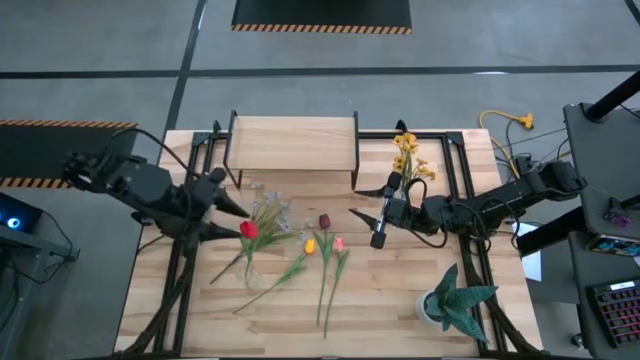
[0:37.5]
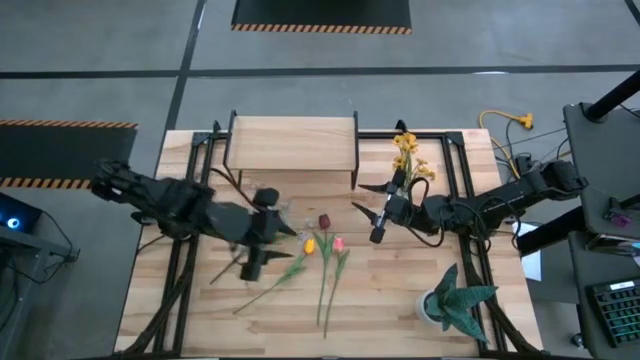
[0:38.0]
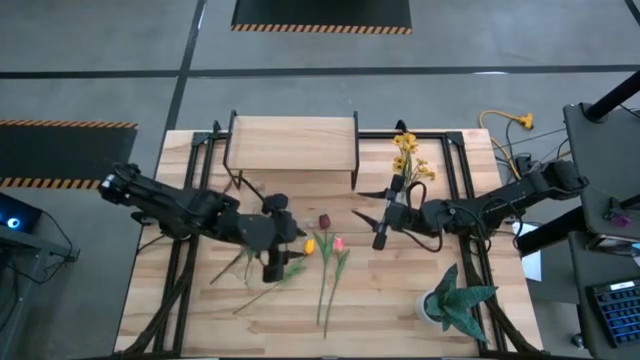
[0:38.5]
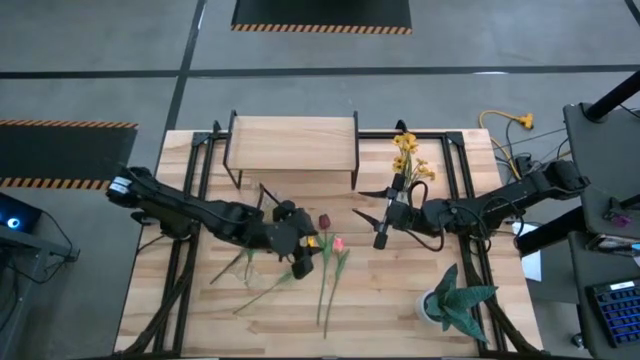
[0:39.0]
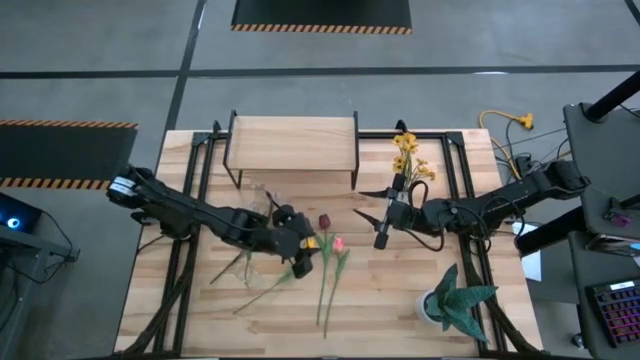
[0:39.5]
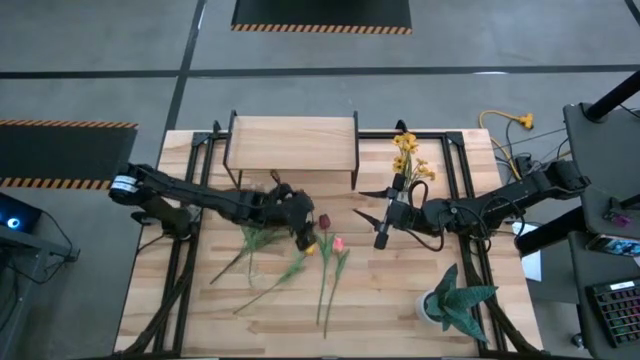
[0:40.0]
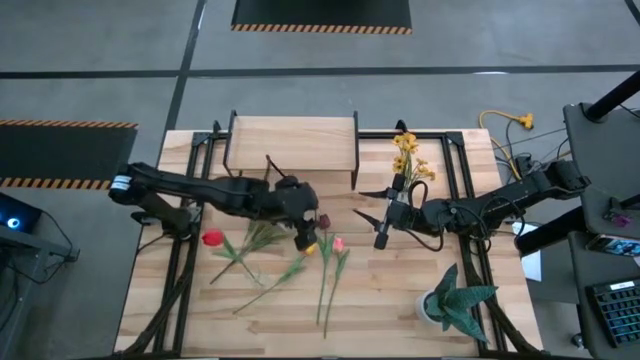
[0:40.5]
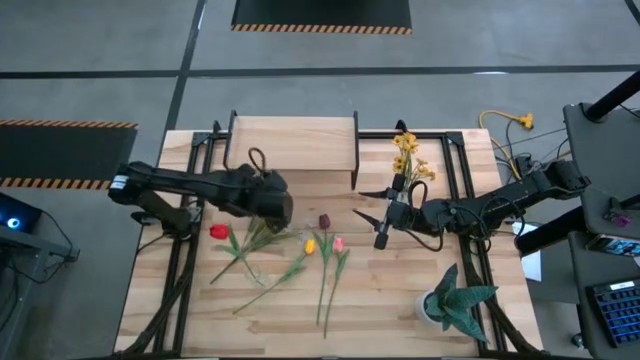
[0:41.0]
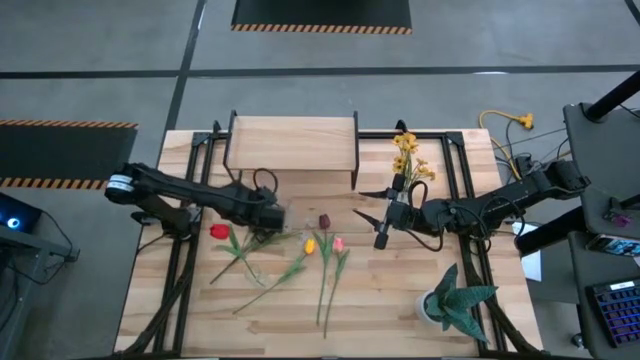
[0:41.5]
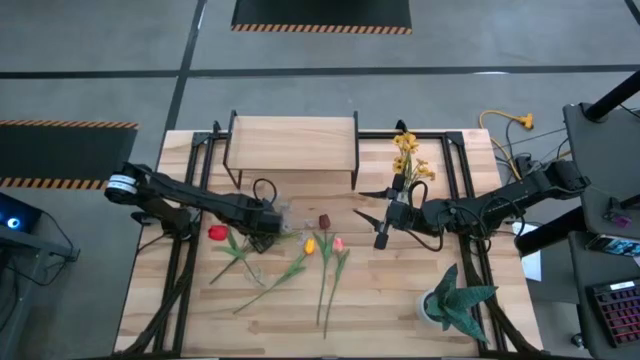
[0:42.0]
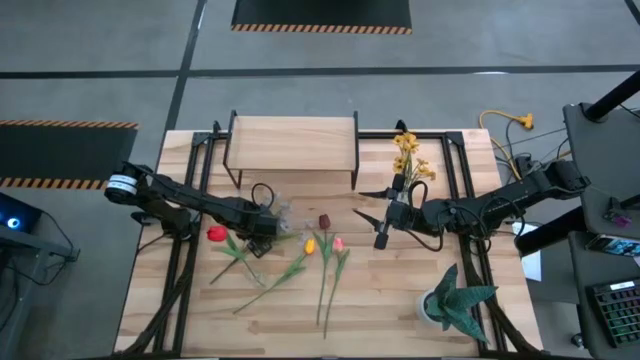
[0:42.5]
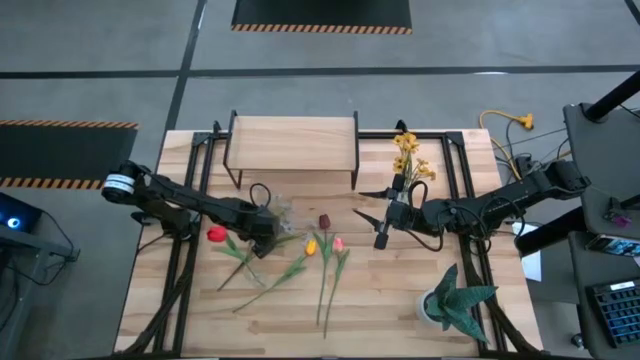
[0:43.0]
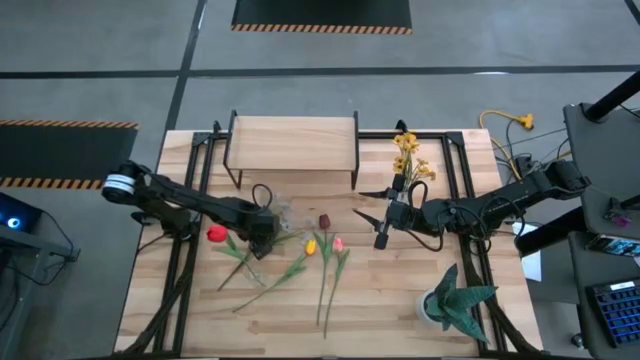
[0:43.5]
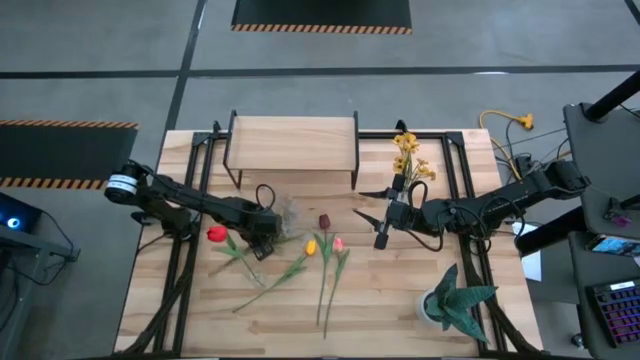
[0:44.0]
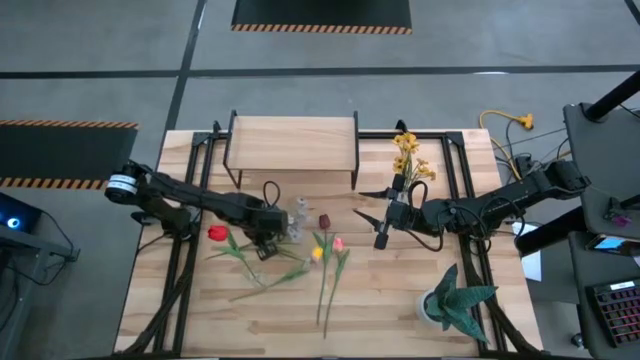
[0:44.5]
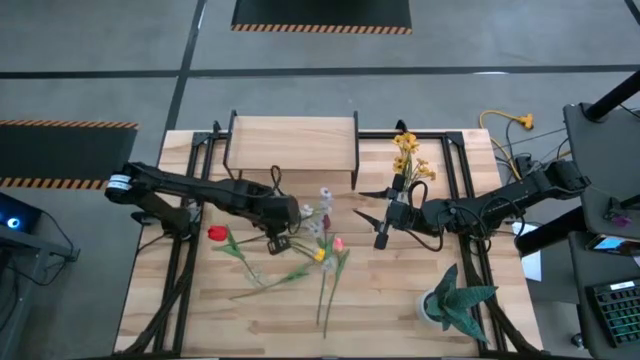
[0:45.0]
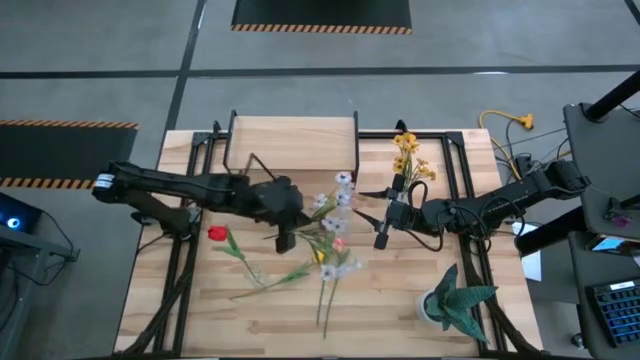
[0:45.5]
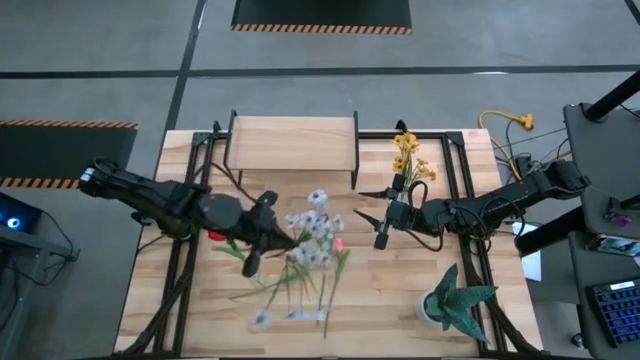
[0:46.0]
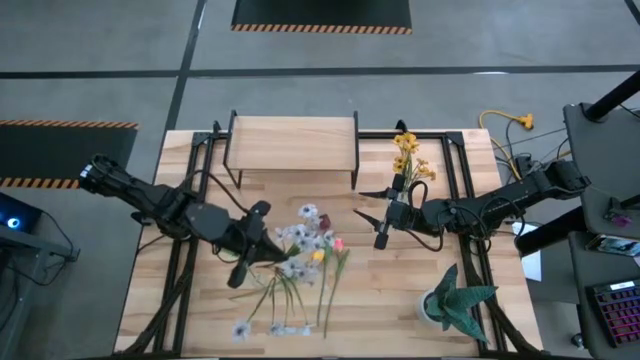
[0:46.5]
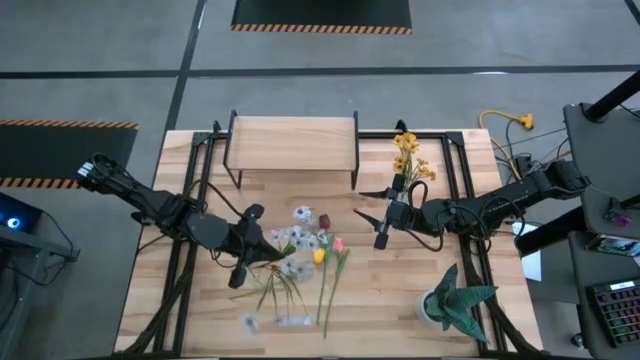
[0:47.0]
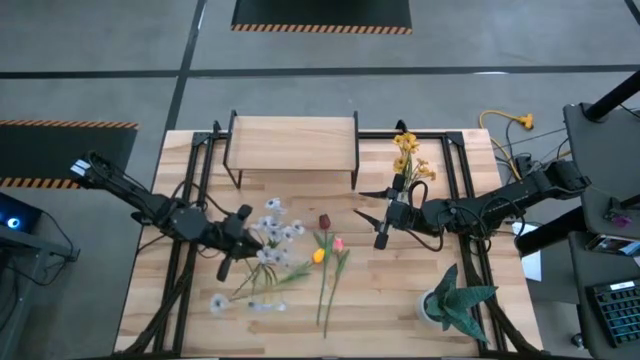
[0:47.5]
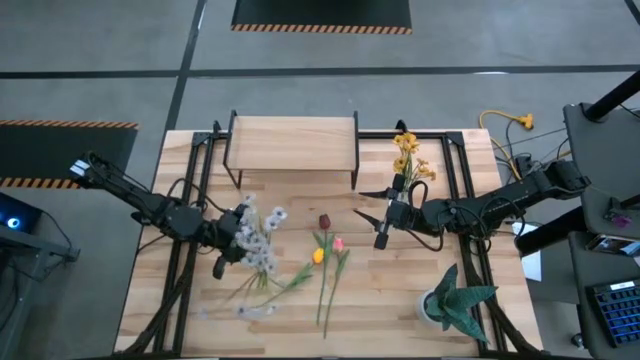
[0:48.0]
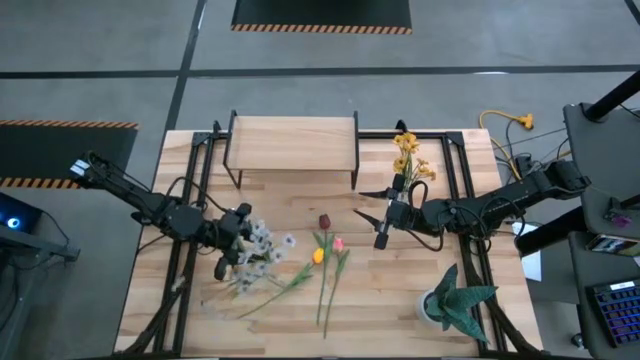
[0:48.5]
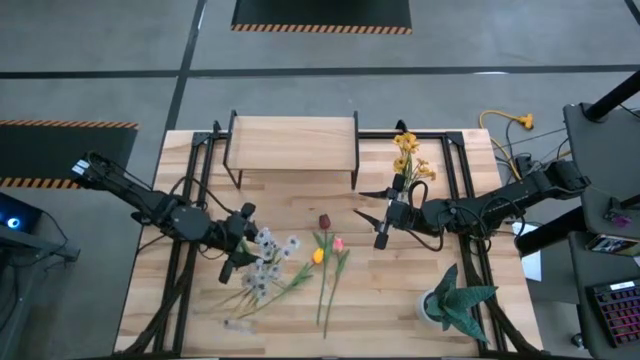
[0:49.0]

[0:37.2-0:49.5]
Task: Pick and place flowers into a vace then onto a shelf
Put the white flowers into the left transparent vase

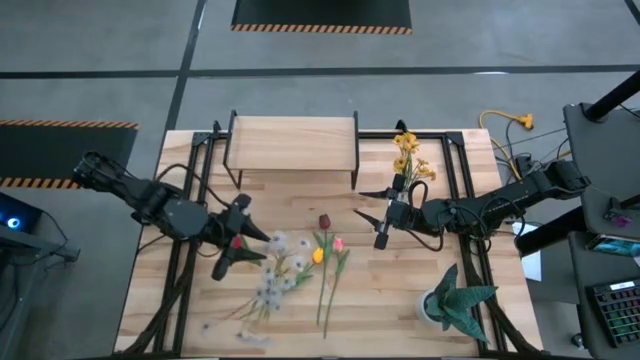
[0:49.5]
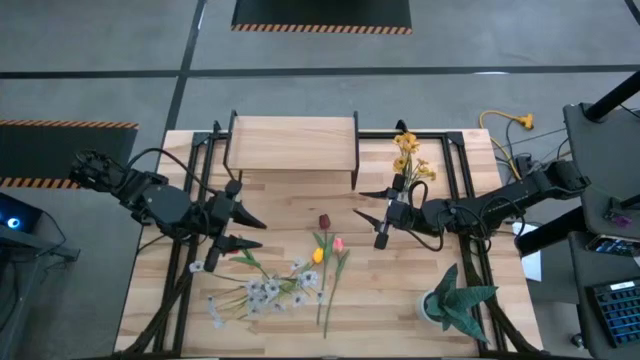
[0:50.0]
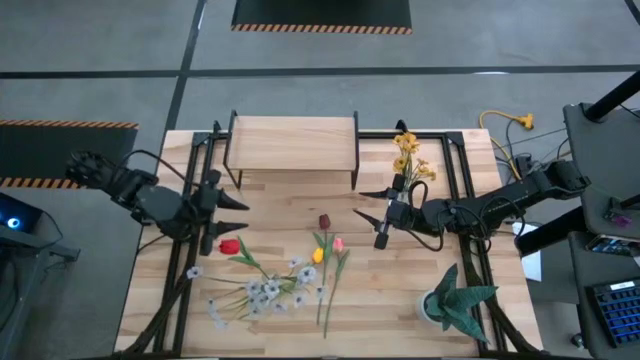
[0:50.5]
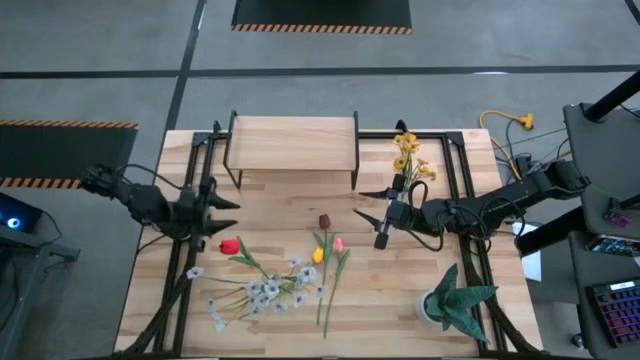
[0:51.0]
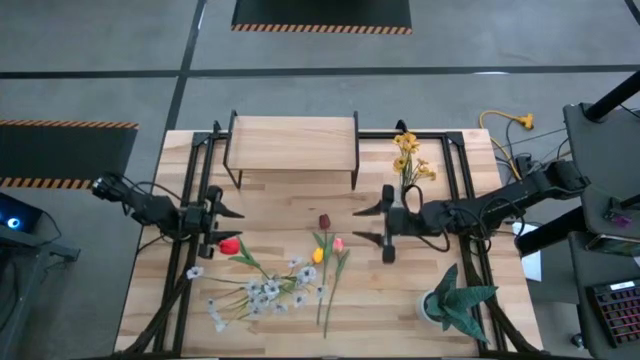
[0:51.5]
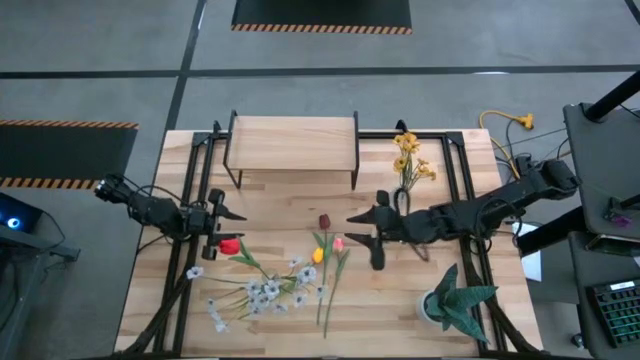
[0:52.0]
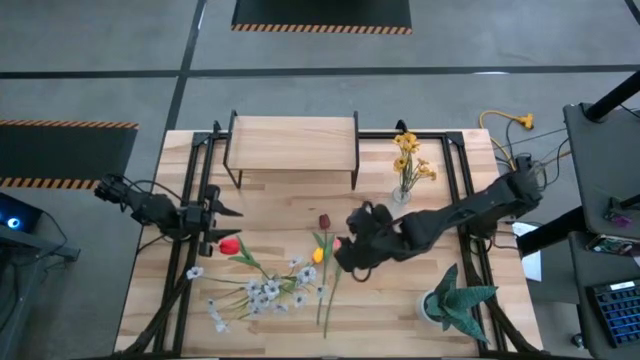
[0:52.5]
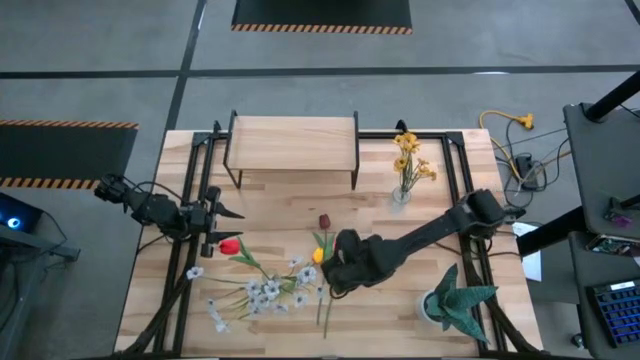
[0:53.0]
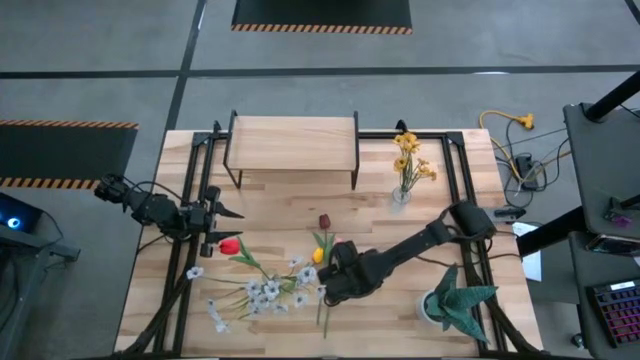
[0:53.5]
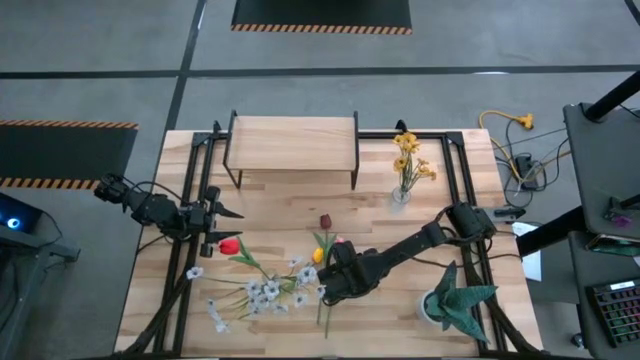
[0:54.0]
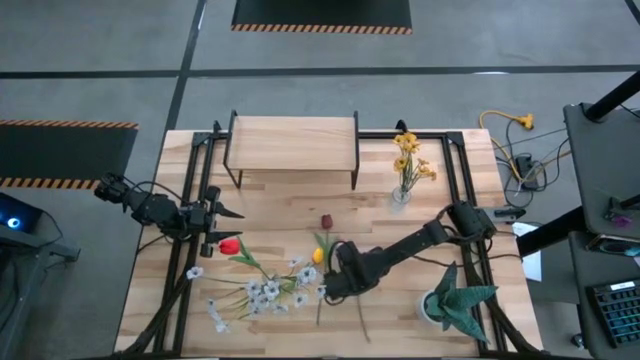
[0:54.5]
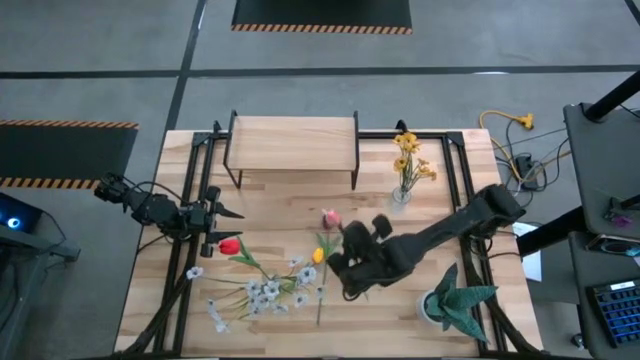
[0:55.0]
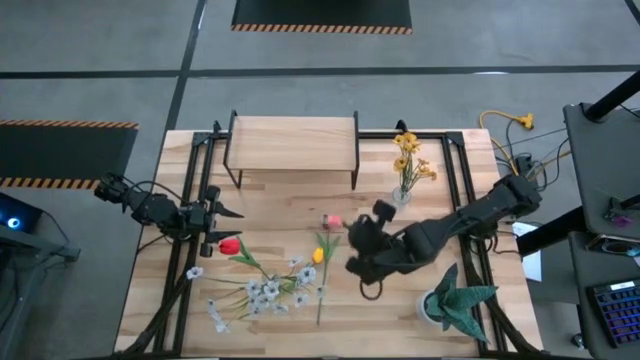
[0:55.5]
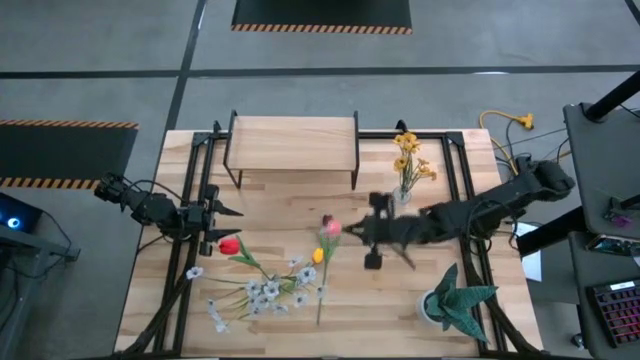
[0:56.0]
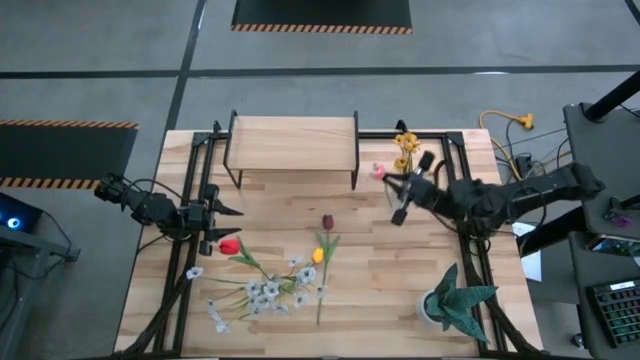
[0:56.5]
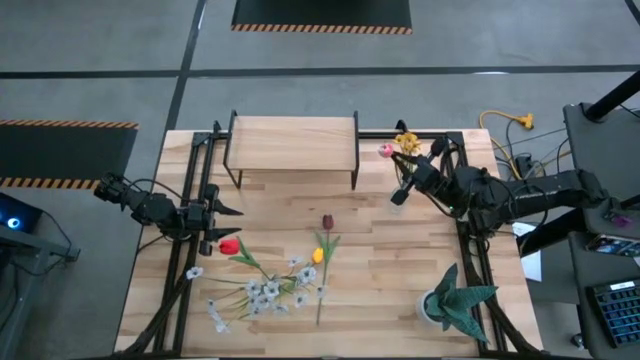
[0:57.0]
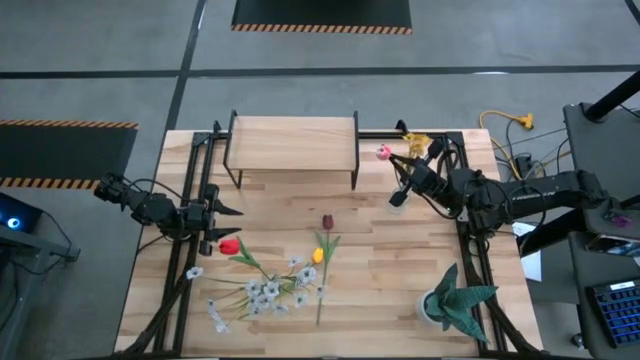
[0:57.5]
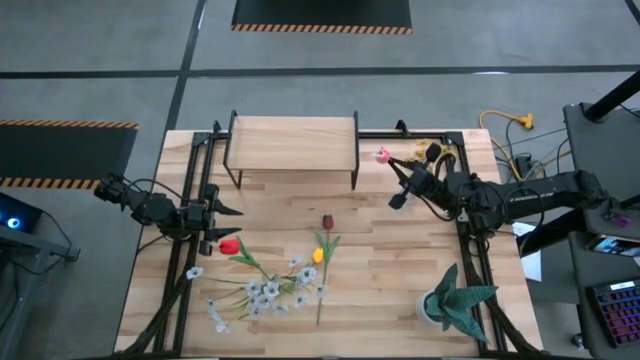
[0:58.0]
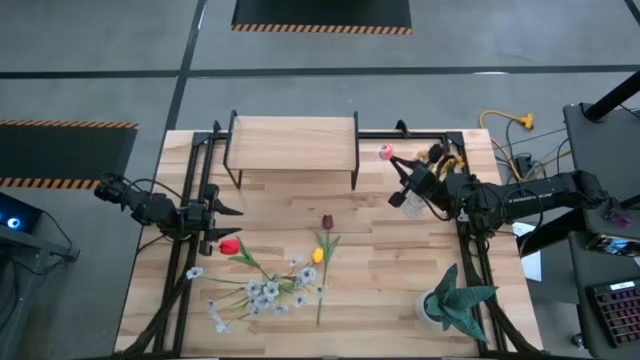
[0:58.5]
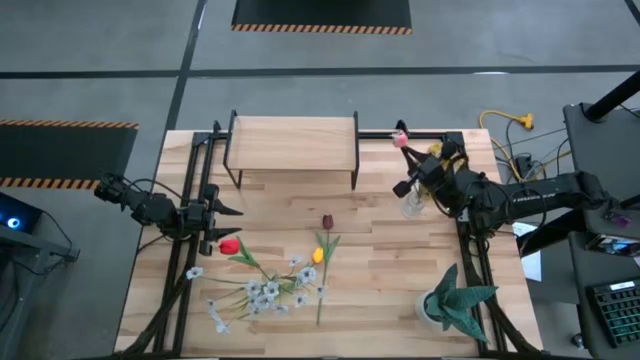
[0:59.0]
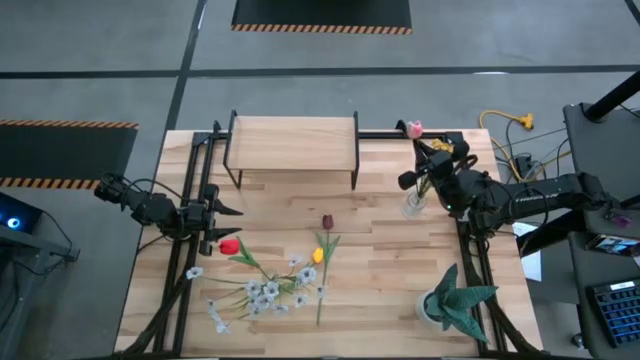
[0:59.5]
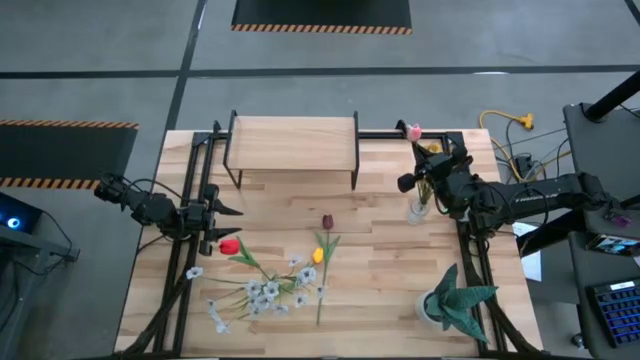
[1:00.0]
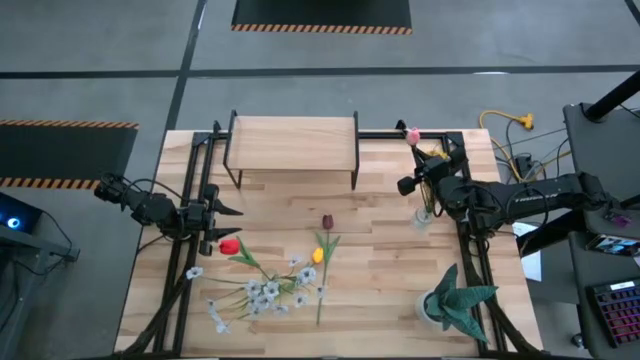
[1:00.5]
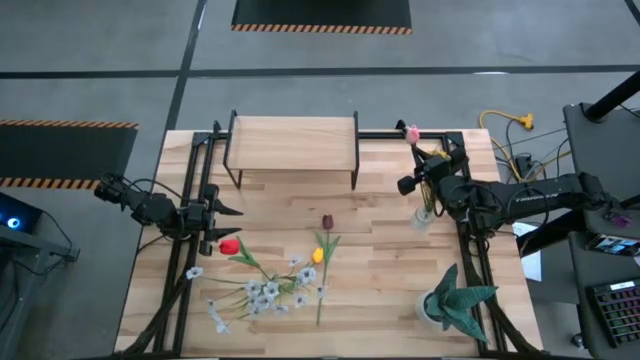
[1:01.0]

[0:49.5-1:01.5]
Put the pink flower into the left transparent vase
